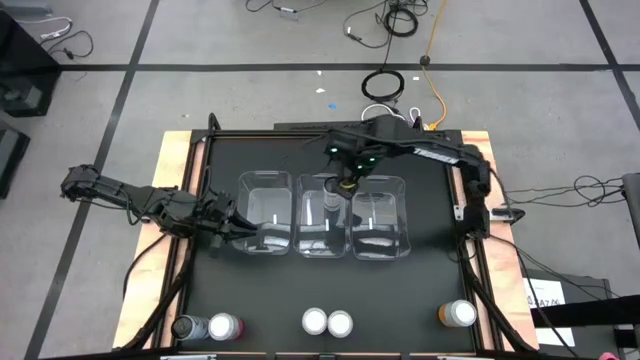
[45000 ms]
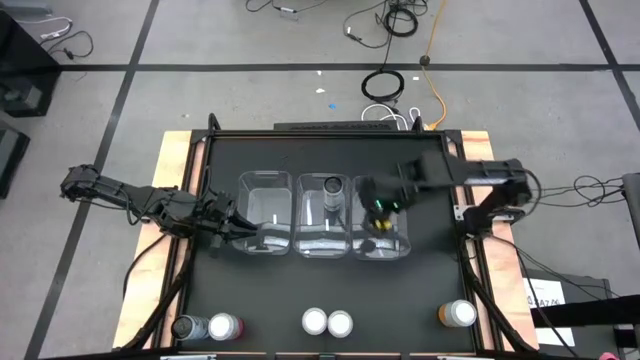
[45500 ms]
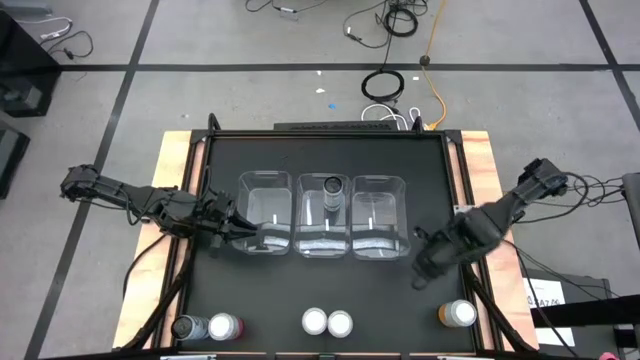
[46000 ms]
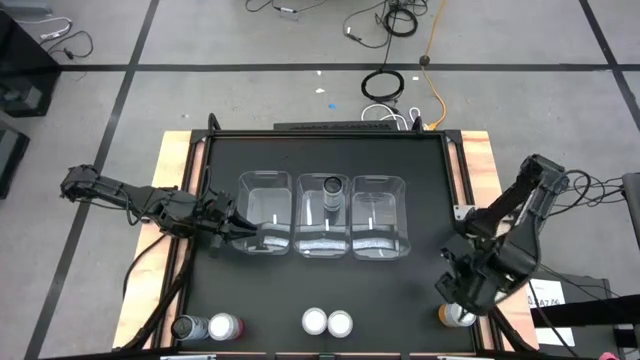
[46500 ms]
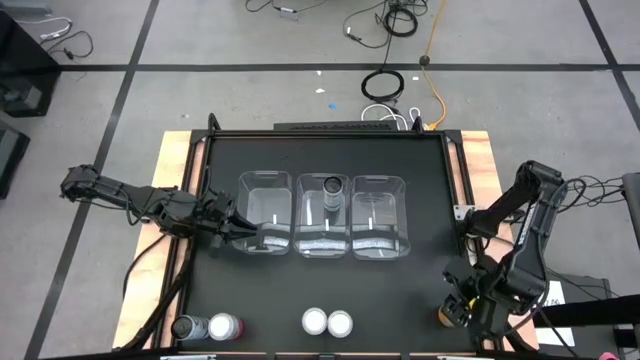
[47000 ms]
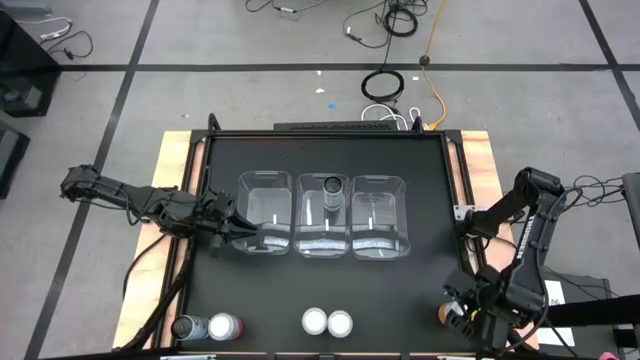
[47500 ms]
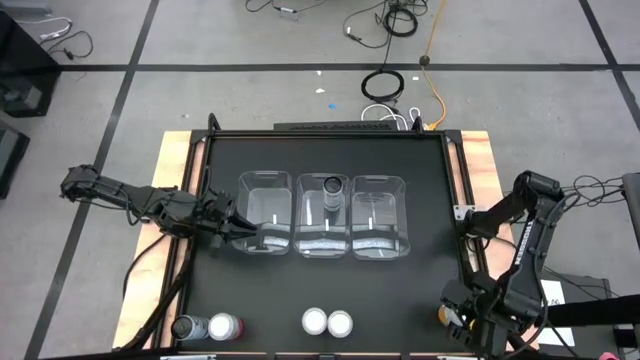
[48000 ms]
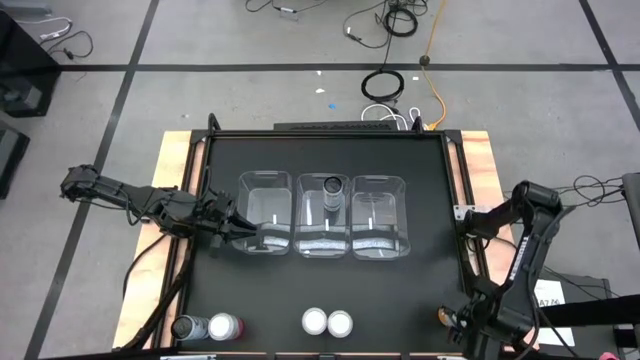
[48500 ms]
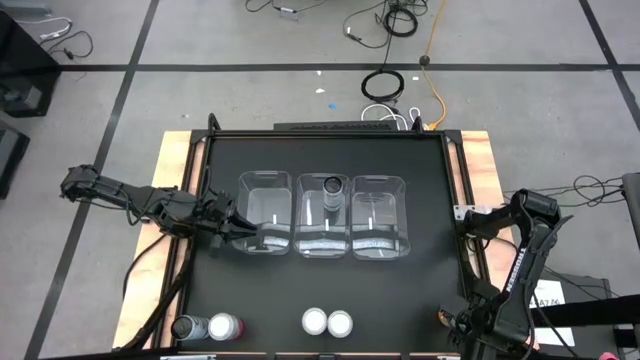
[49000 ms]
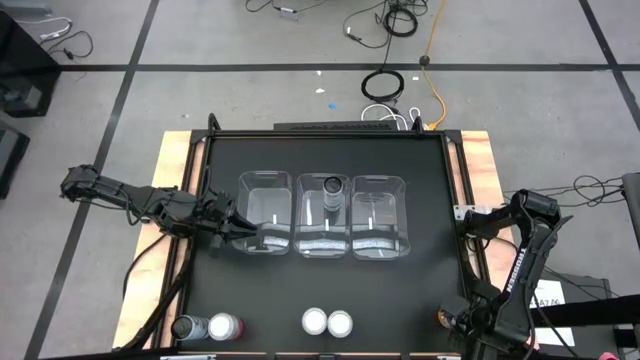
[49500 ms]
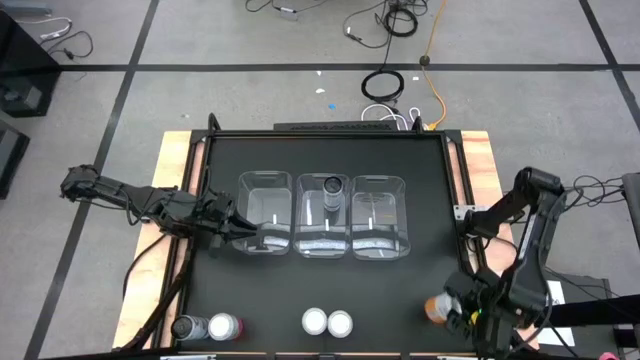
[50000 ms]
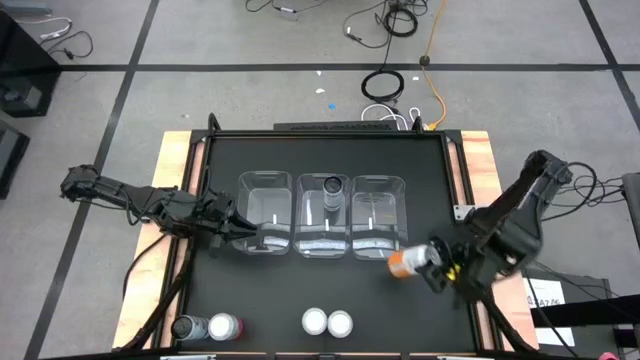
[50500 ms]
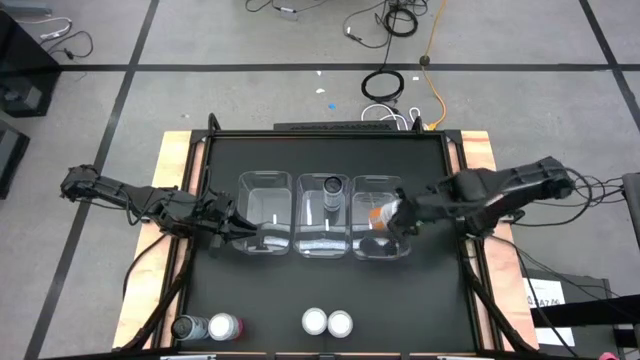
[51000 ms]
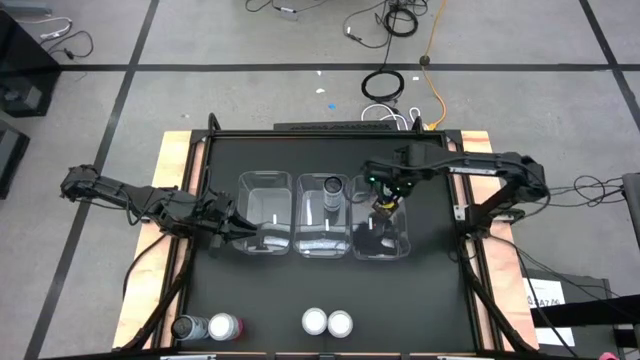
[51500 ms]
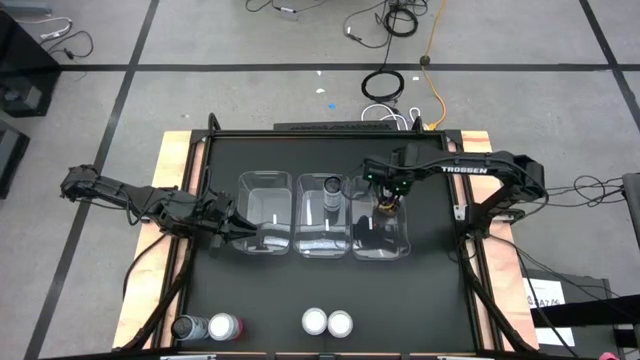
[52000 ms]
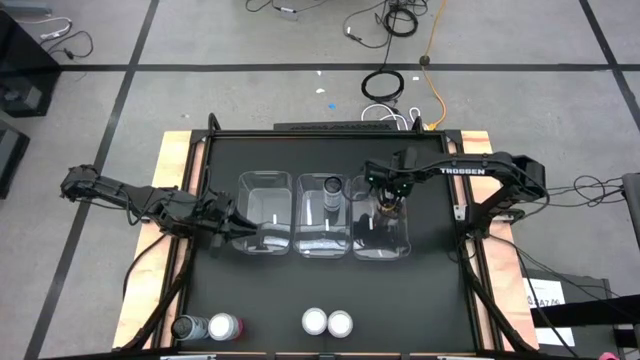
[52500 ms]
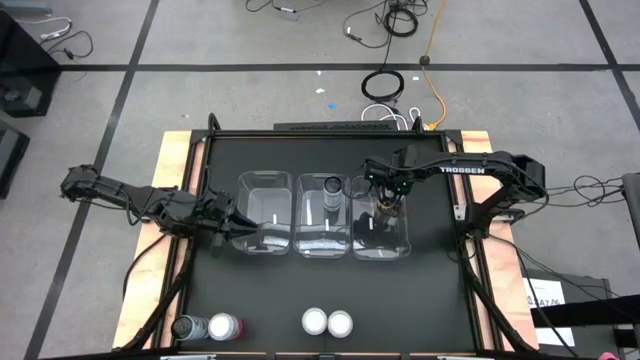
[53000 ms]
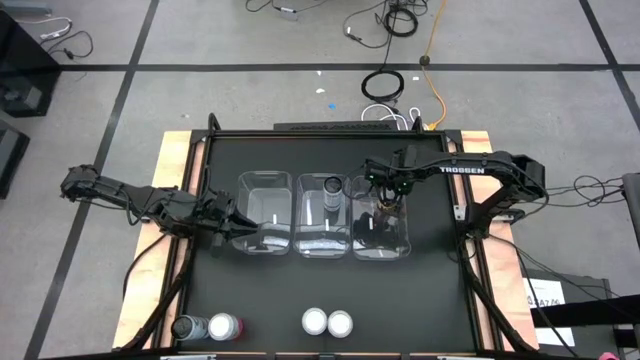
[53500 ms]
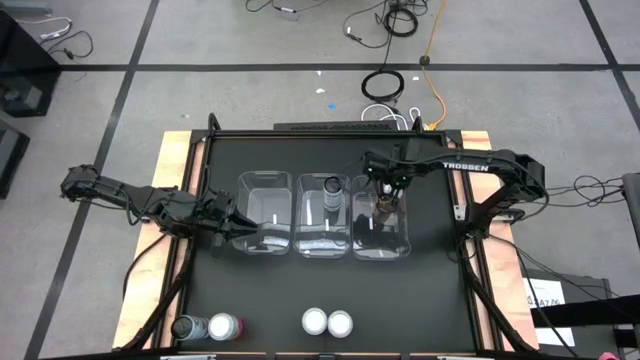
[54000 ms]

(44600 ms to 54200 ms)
Task: Sort soda cans
Put the right yellow-white soda can into the middle right transparent bin

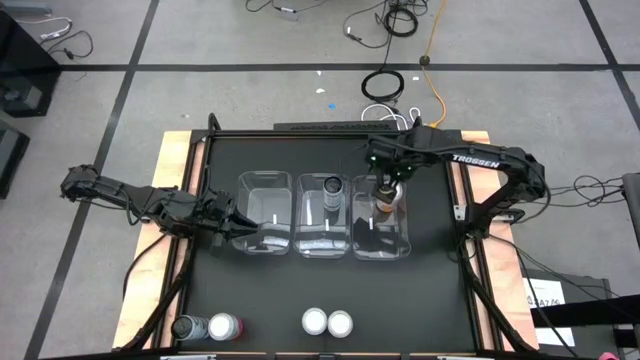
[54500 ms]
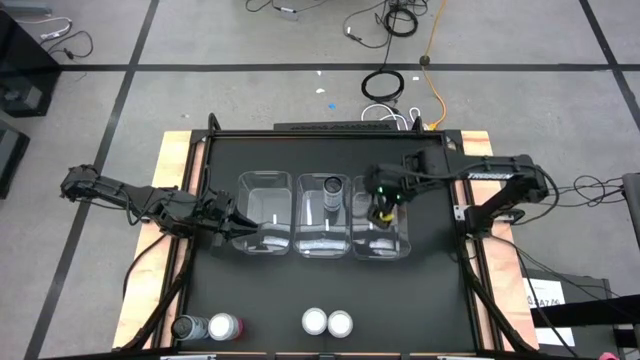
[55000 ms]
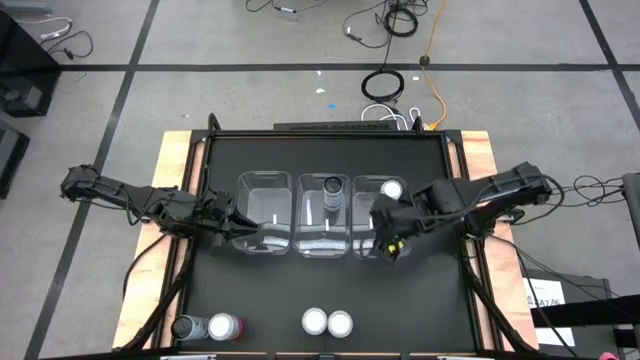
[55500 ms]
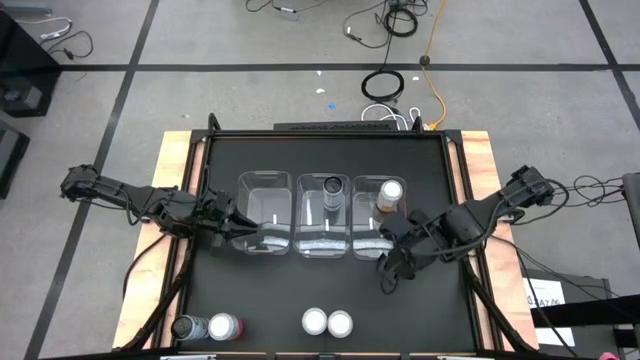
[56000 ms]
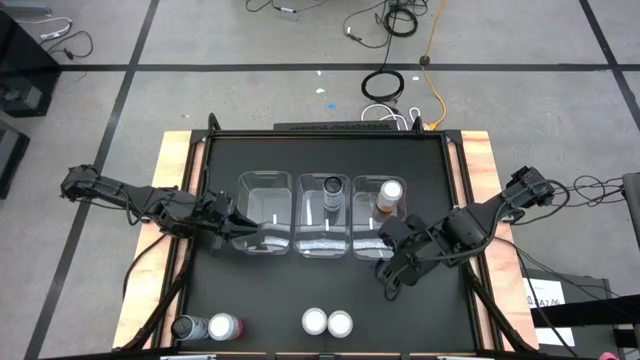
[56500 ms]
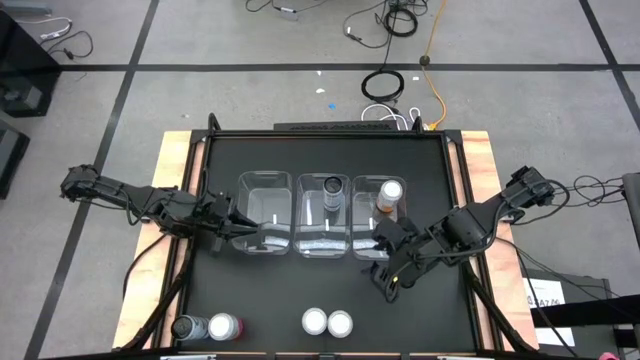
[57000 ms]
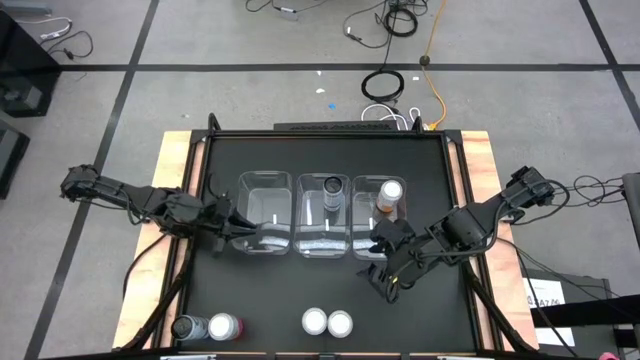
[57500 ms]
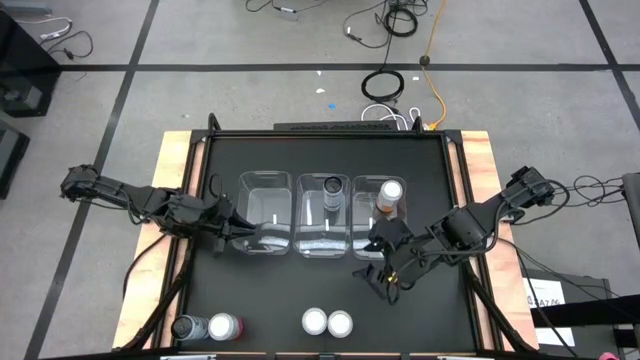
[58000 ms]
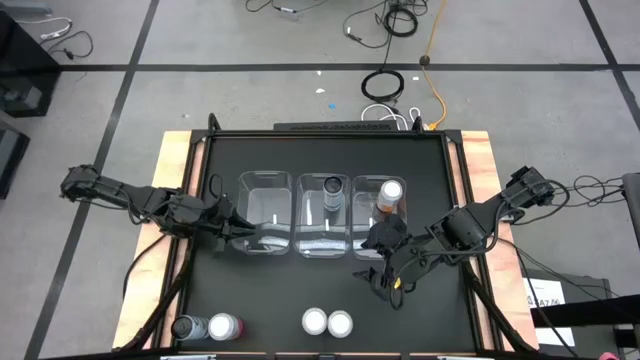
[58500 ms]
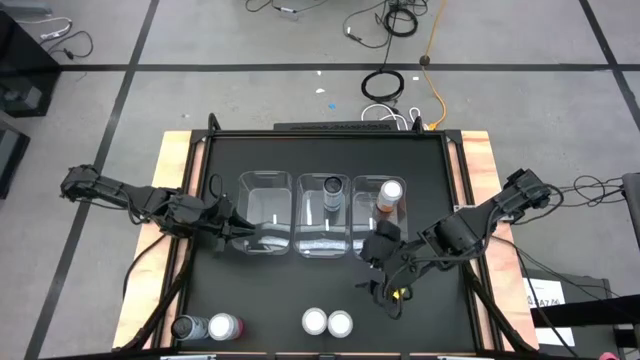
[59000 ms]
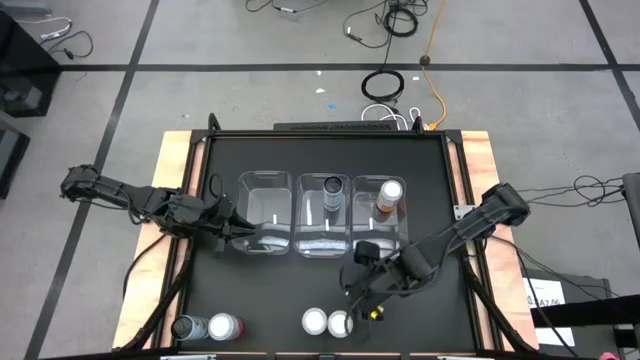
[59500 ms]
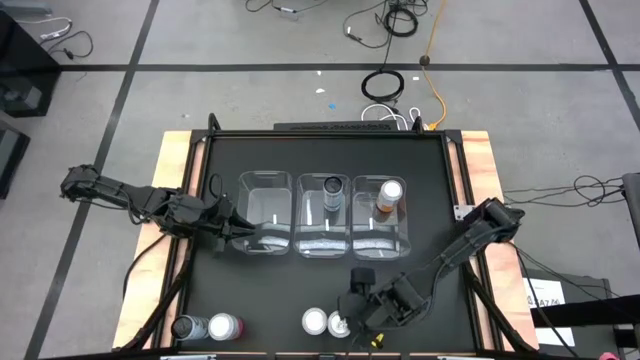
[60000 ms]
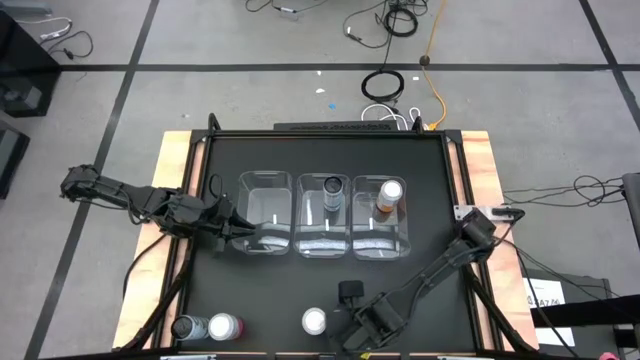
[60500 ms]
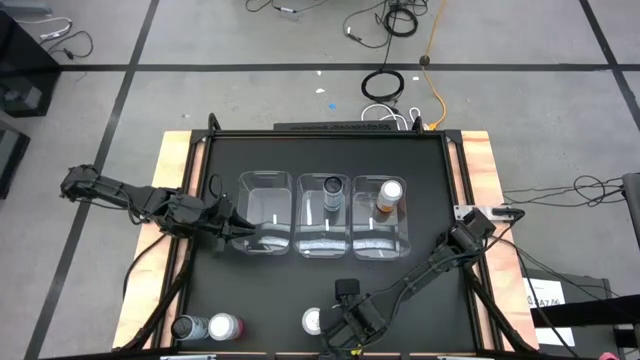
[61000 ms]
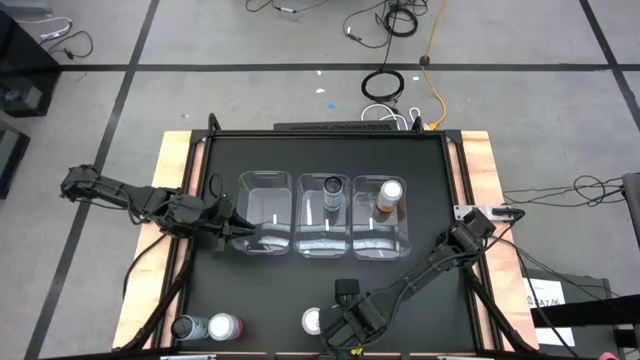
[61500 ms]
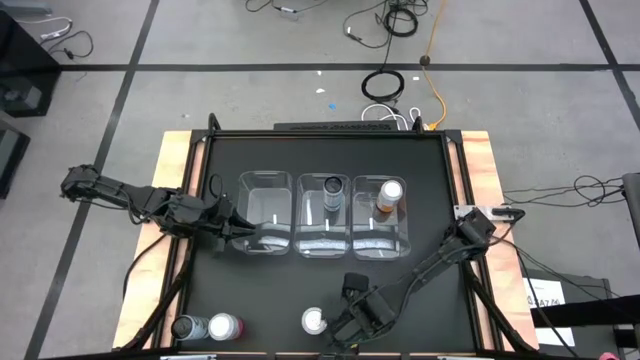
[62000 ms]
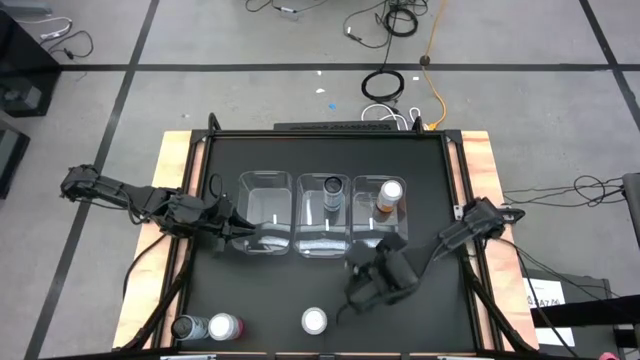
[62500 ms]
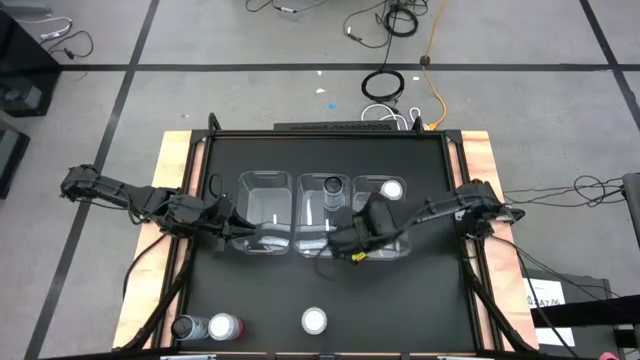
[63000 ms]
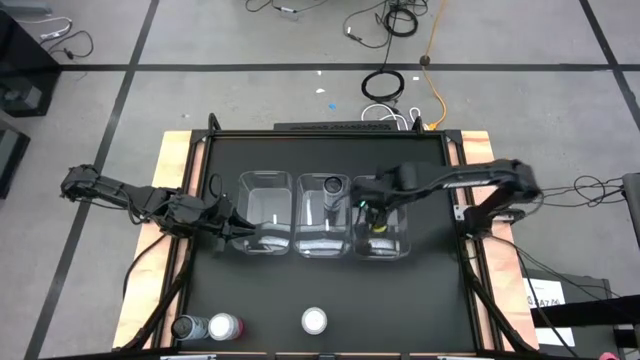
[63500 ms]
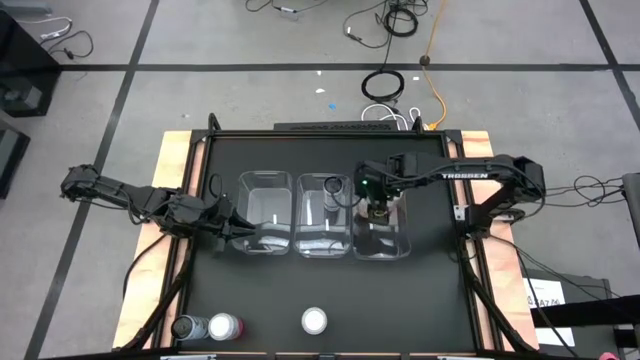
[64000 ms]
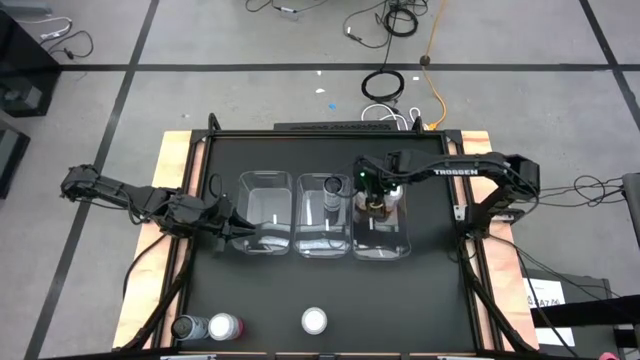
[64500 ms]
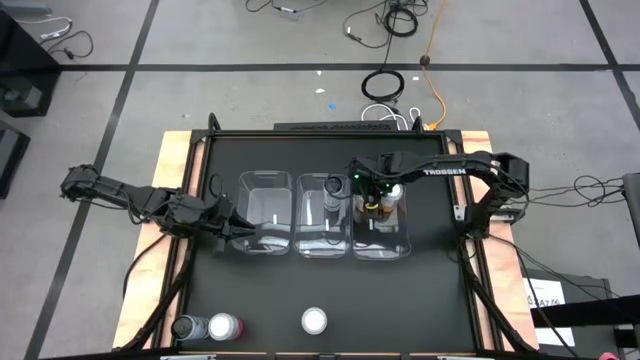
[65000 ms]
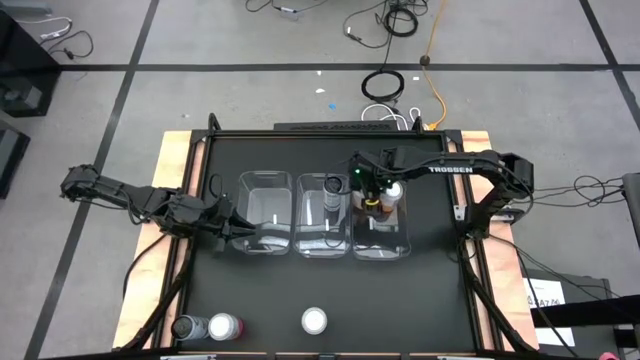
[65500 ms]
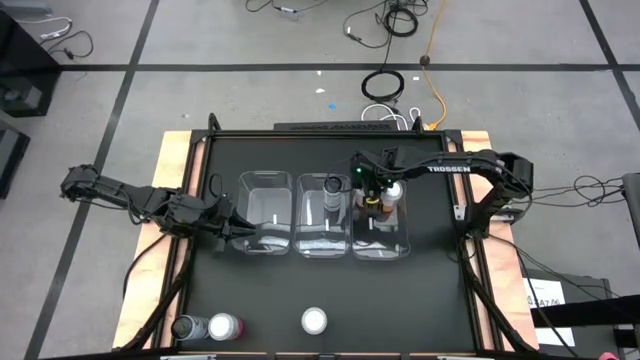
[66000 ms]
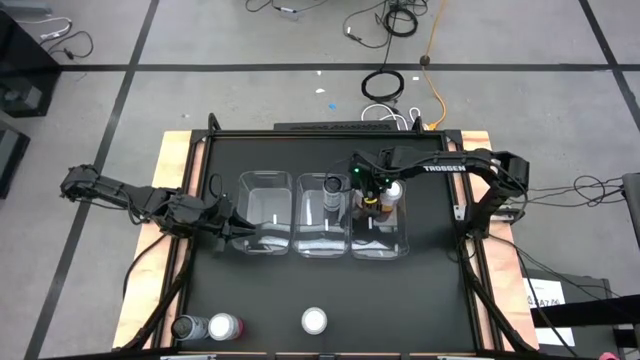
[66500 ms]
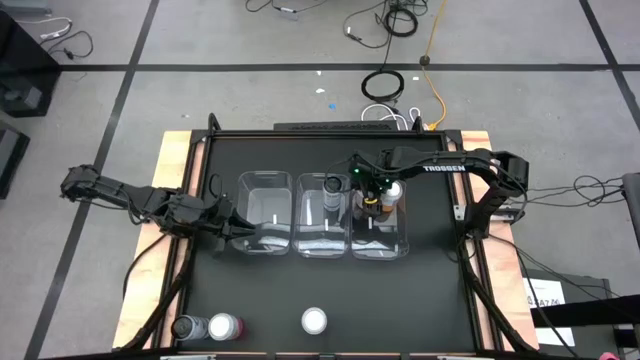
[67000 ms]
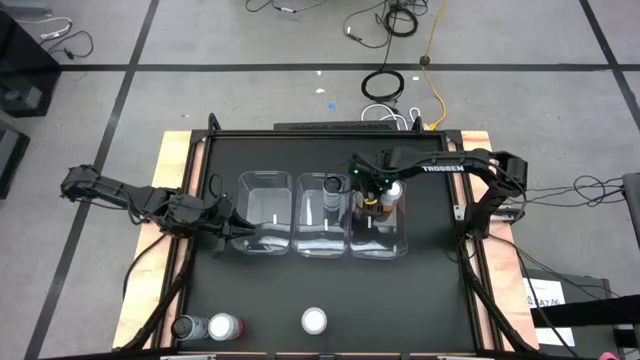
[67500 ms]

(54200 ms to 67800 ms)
Put the left yellow-white soda can into the middle right transparent bin
